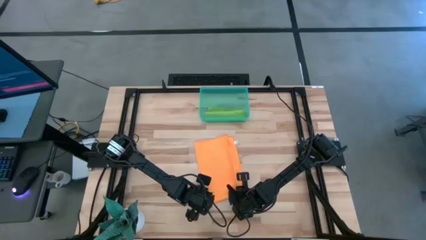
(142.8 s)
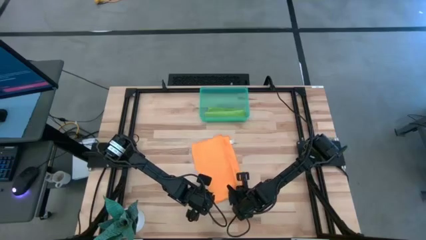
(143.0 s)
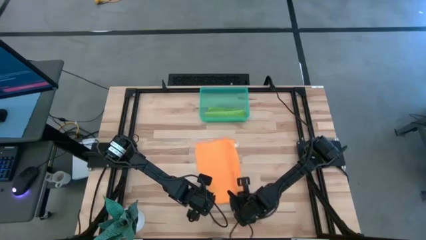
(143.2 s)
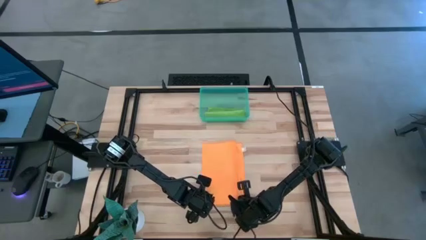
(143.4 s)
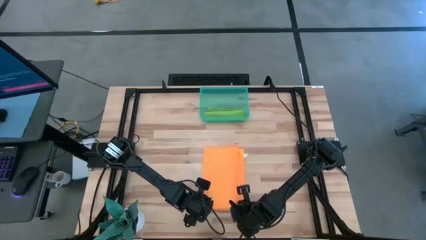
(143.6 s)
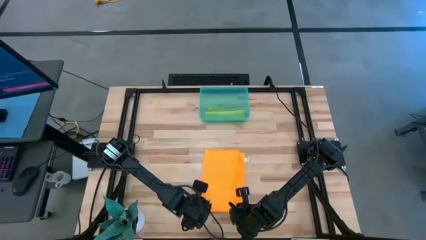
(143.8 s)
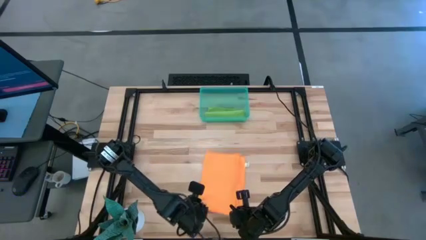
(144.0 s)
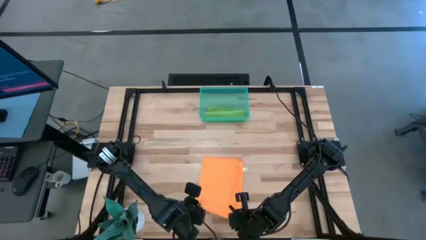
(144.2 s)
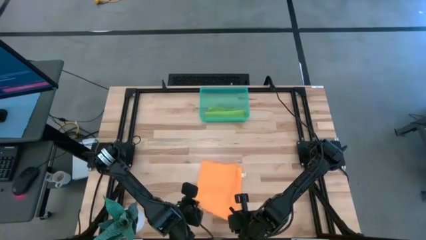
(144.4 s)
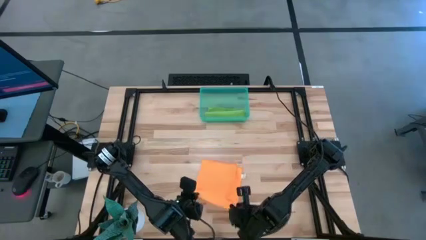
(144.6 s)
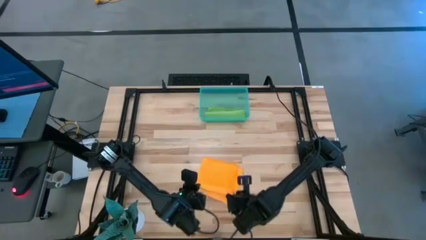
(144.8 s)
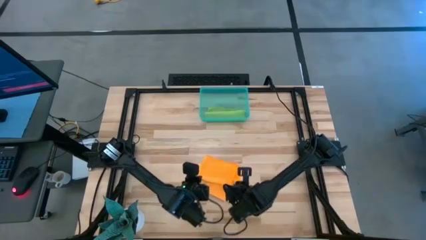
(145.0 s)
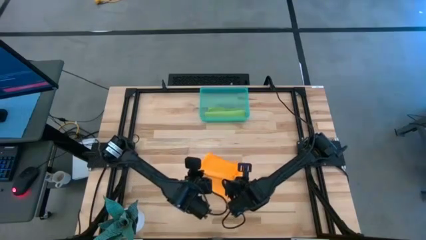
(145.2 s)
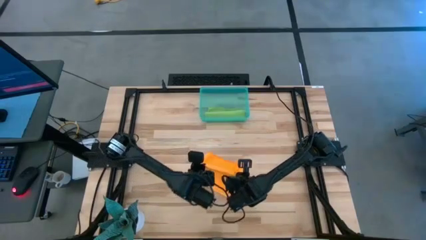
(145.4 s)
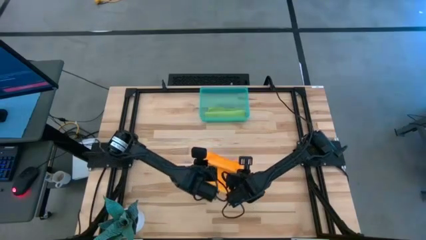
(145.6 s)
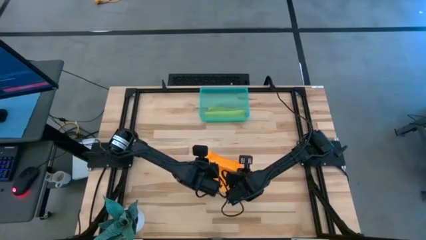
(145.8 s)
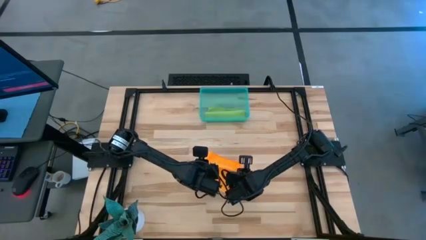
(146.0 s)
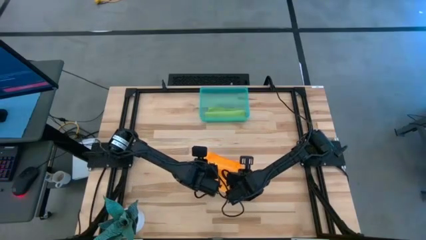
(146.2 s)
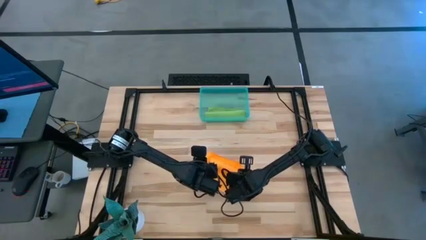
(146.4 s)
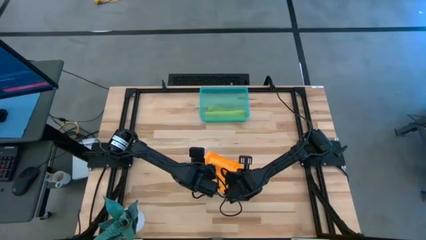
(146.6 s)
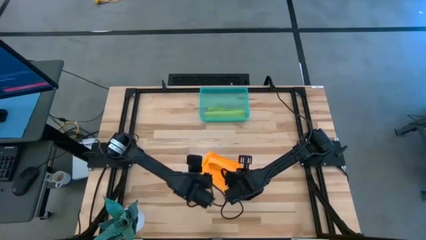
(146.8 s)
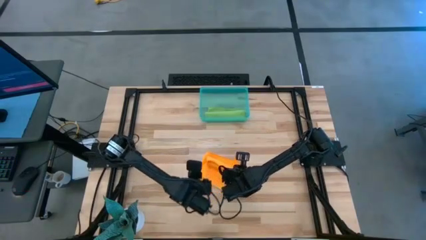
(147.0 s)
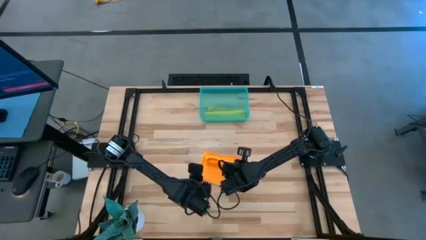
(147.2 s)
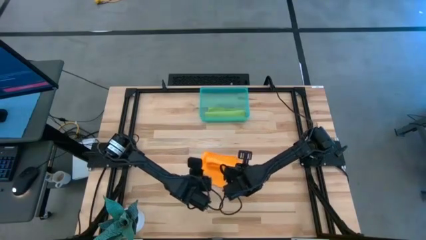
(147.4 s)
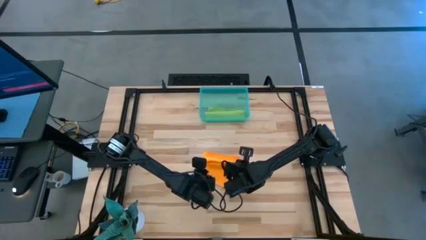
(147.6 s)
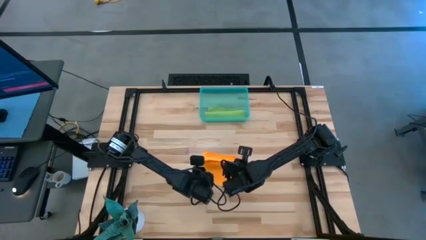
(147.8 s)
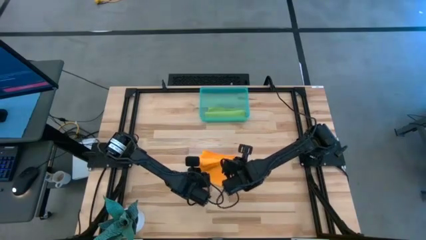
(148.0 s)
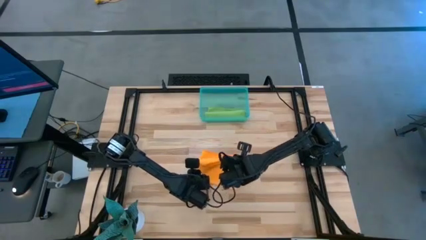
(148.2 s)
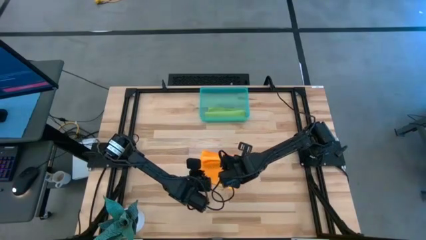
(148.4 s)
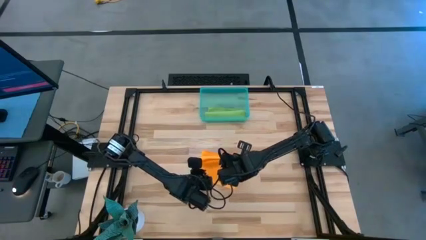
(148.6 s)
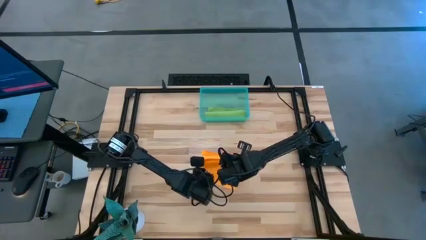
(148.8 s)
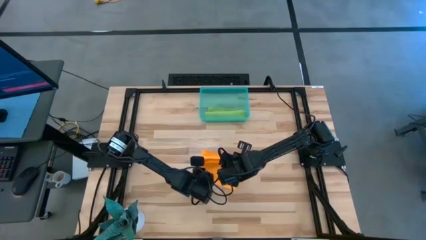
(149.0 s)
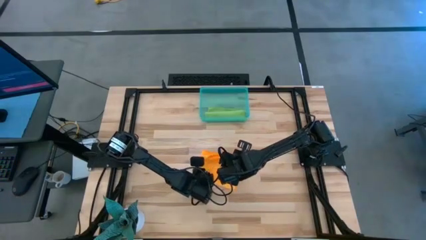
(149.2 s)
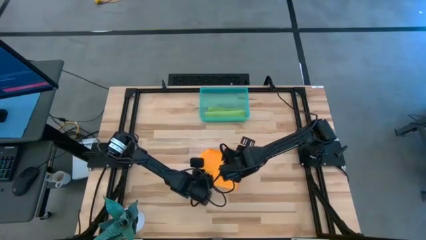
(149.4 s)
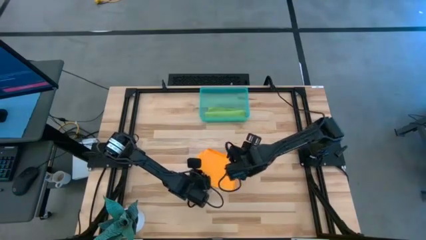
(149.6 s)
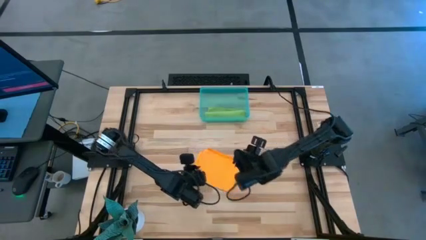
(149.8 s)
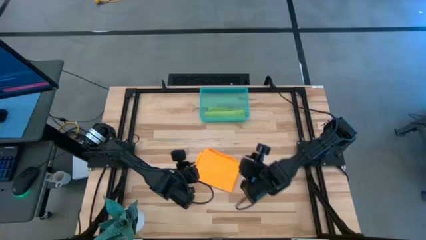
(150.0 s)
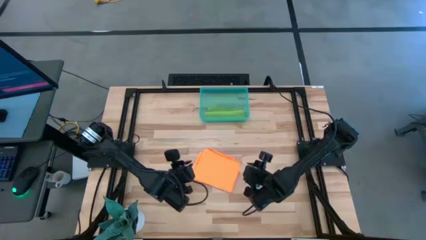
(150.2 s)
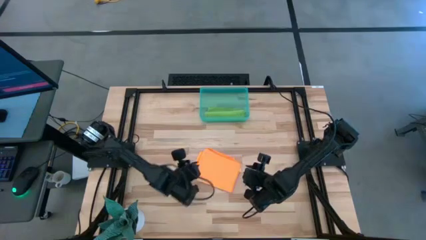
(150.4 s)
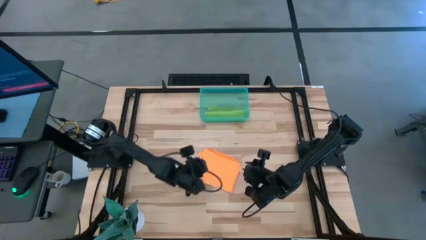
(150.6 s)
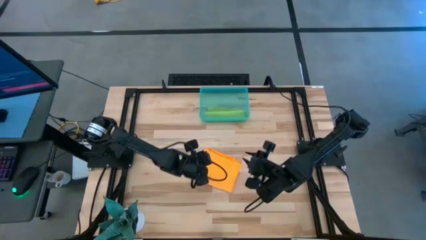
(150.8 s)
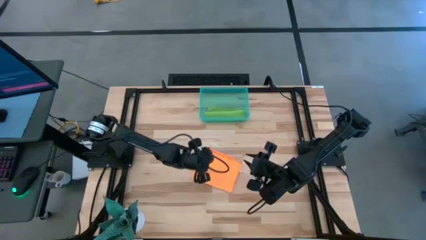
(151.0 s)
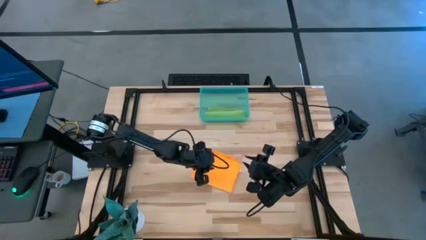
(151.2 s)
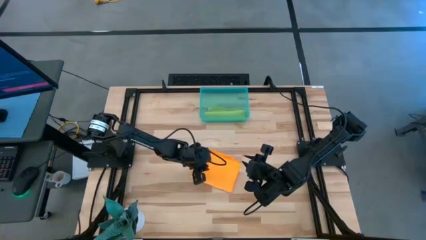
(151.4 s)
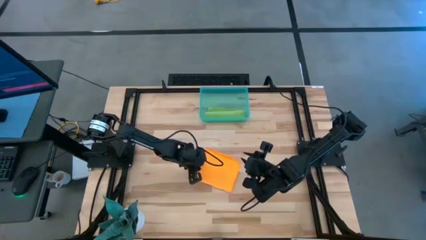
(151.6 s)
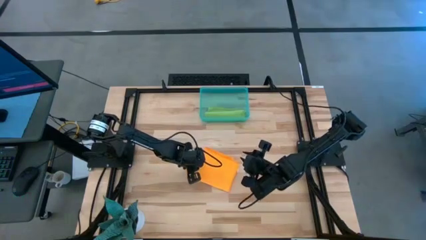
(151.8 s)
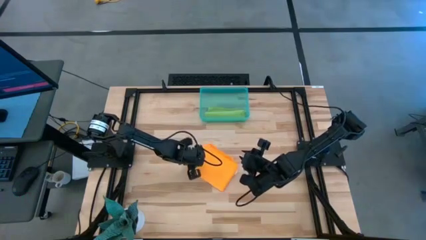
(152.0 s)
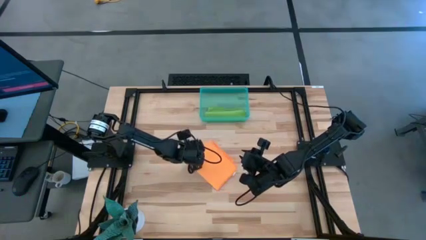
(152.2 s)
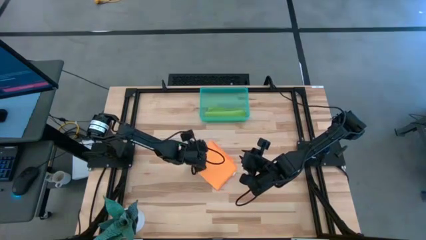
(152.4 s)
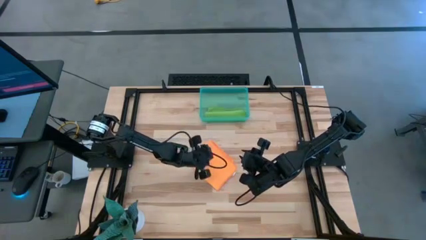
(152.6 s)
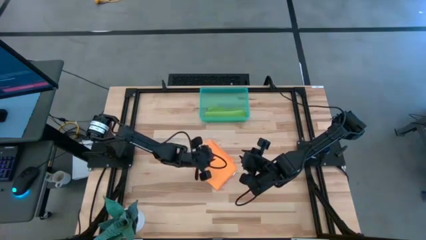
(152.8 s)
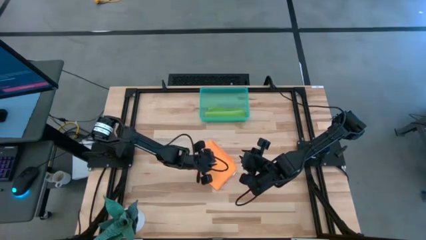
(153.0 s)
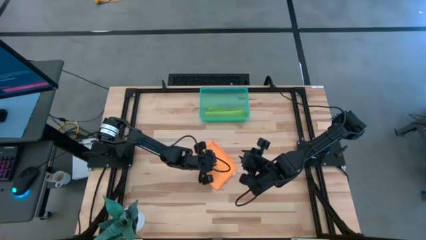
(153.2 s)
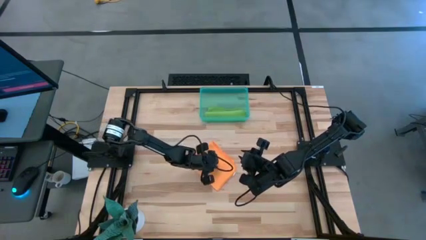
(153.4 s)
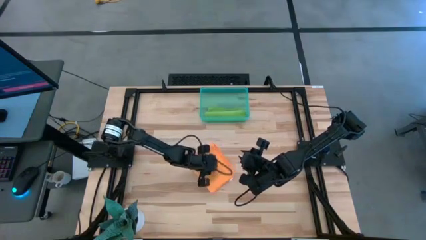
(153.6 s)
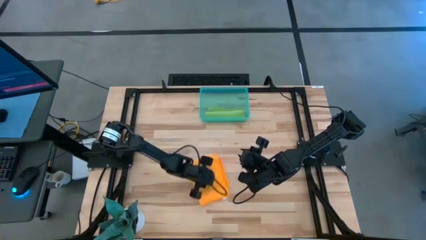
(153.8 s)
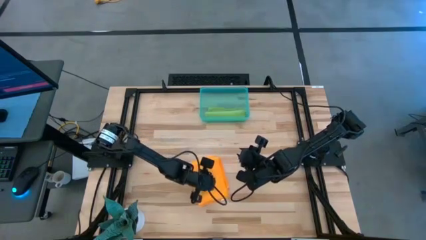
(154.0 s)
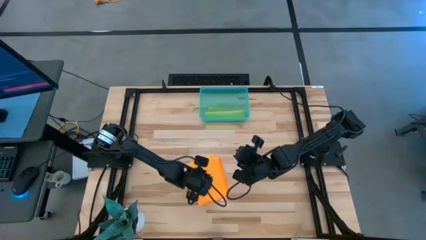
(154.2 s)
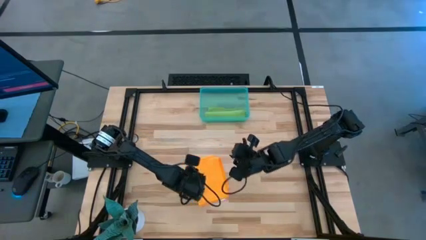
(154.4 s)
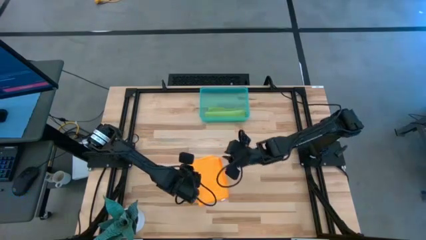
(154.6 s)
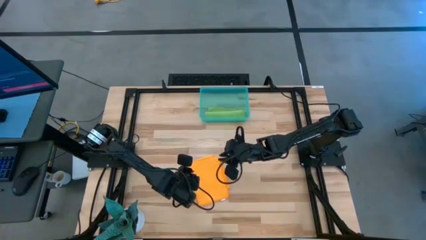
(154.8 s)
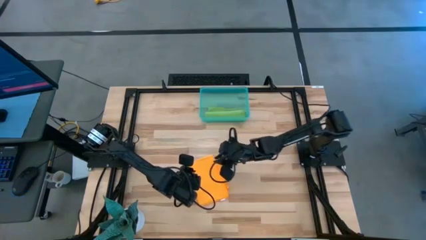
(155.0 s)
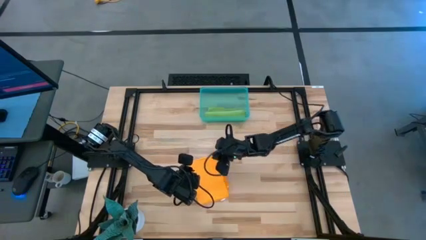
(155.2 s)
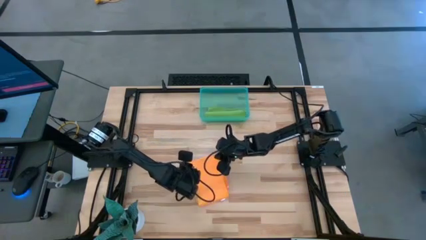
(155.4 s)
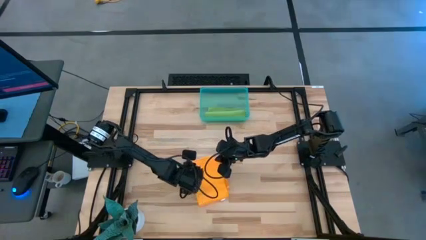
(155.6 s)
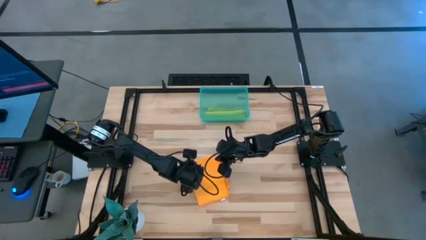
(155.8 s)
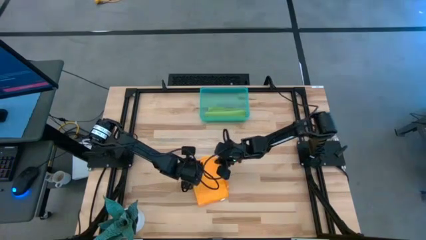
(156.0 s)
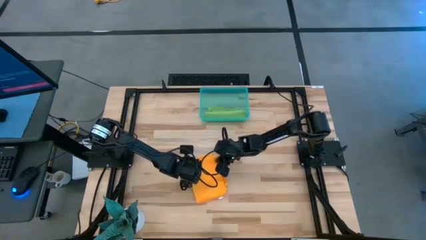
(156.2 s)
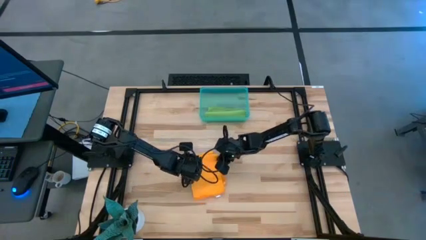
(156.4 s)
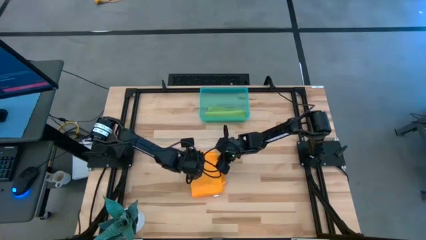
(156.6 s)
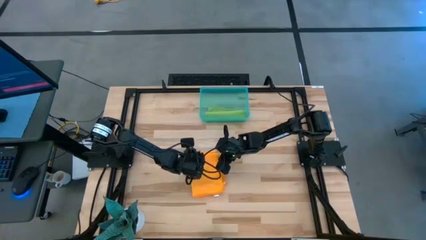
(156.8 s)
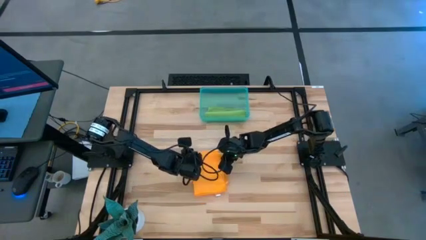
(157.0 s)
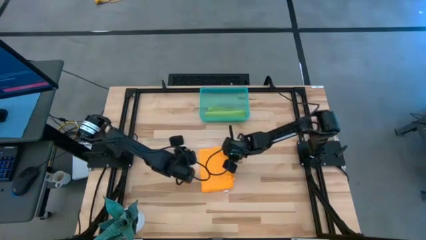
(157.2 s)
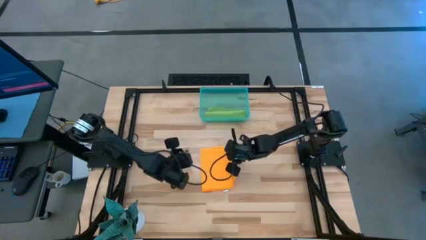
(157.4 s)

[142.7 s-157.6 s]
Task: Roll microfiber towels into tight, uniform cylinder then place into a basket
Fold the yellow microfiber towel

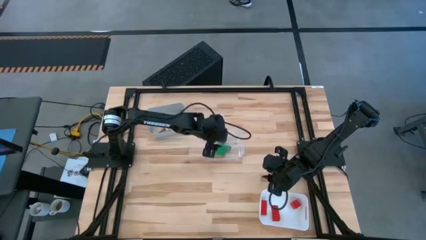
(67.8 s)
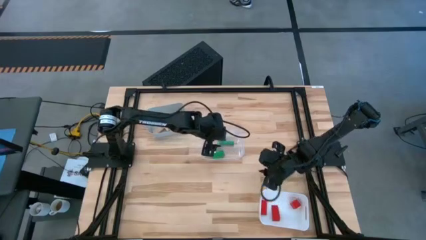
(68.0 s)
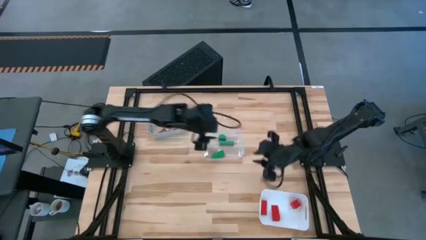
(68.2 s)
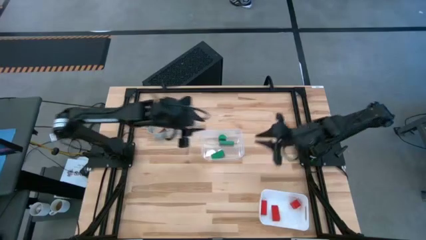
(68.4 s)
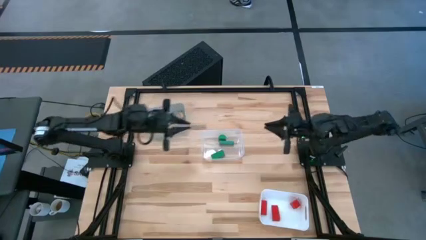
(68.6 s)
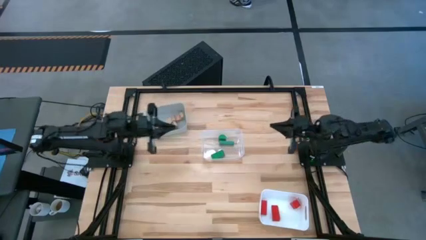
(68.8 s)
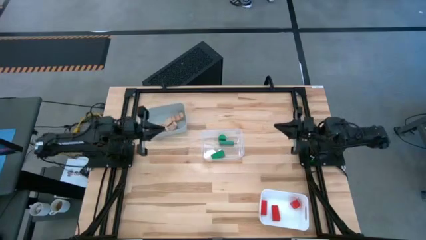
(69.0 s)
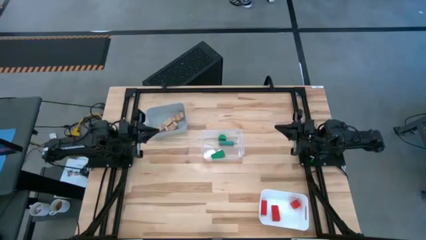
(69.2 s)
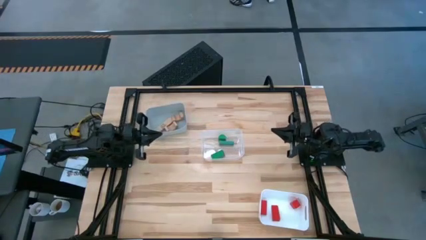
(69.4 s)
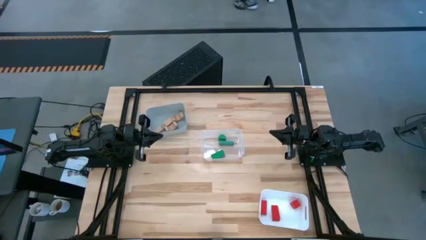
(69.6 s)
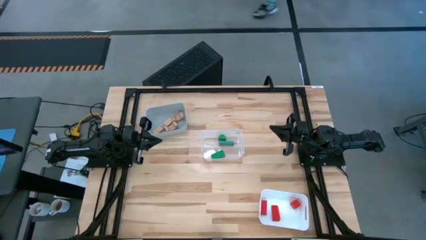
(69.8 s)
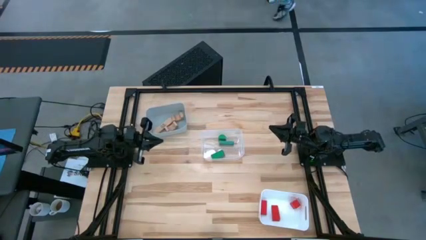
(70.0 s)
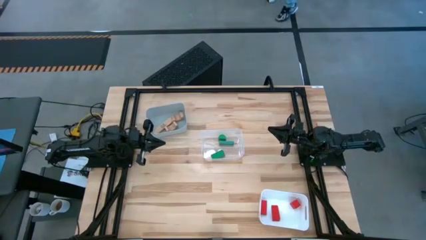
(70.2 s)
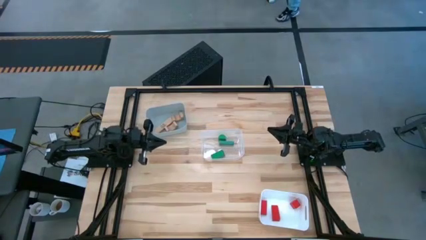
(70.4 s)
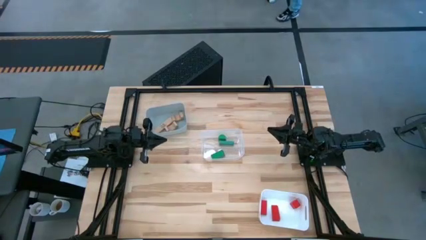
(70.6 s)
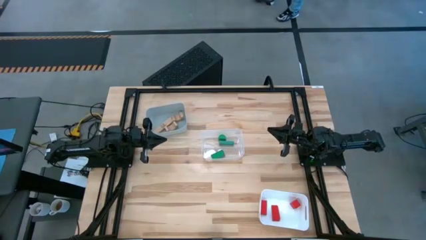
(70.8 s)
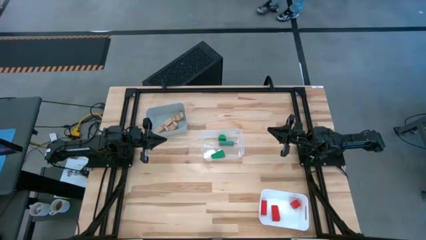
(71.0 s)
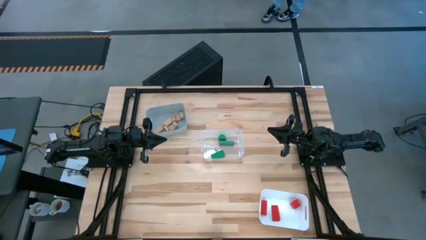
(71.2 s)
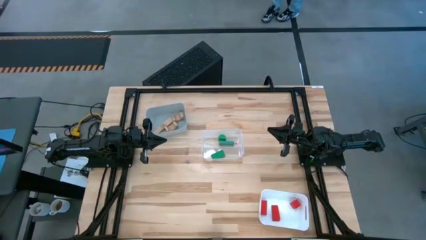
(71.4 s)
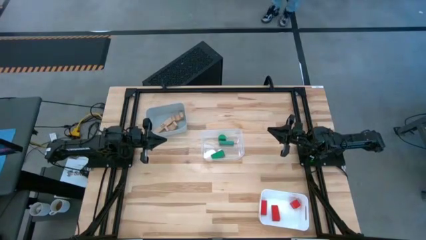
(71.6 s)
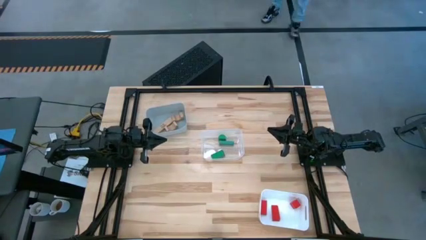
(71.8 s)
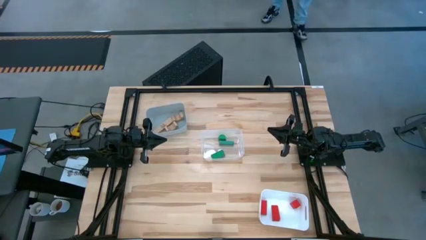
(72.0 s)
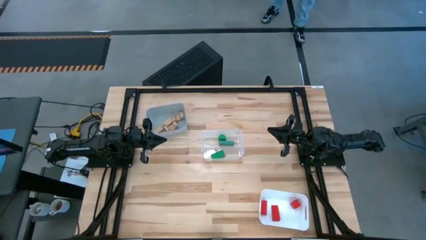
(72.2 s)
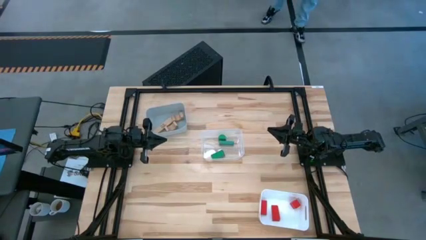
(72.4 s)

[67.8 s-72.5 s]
Task: Sort & place blocks by color
Return to Home Position
